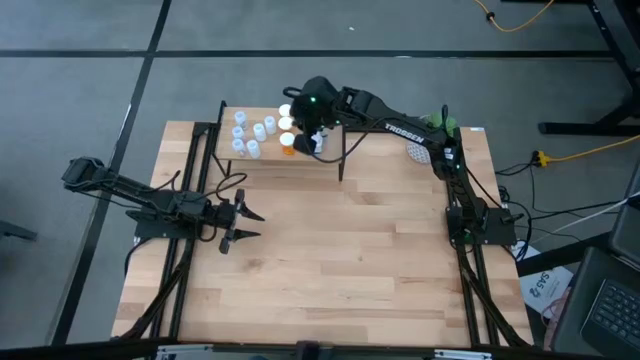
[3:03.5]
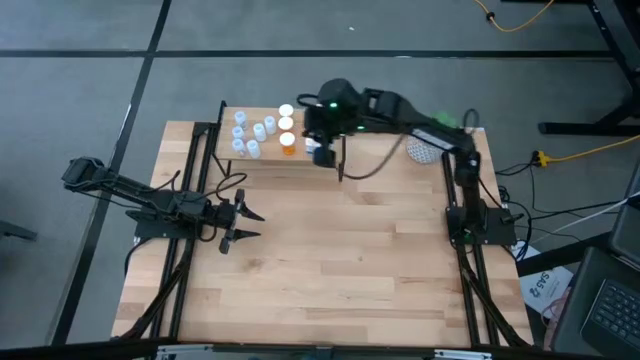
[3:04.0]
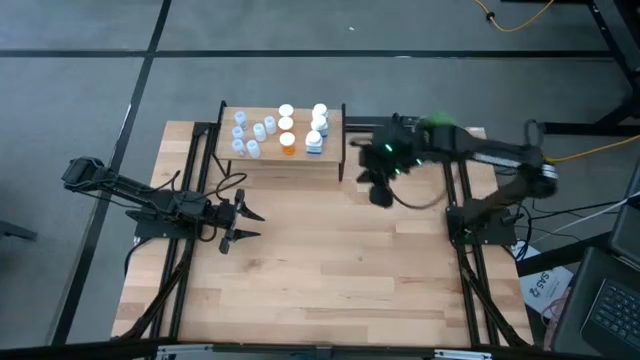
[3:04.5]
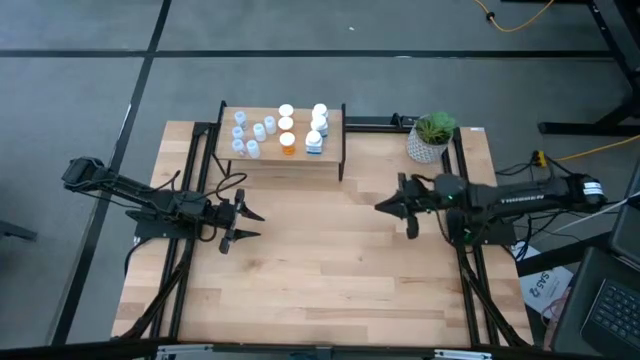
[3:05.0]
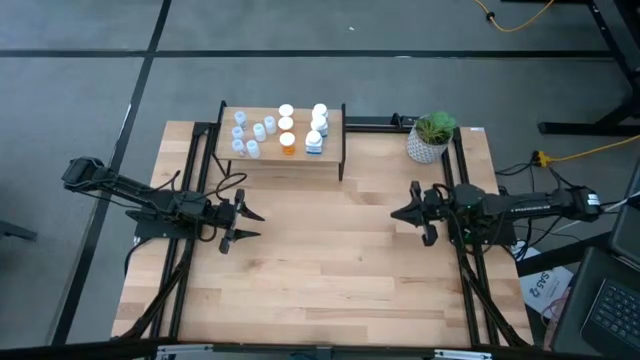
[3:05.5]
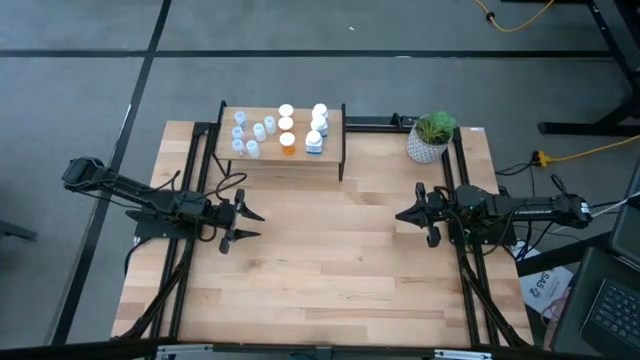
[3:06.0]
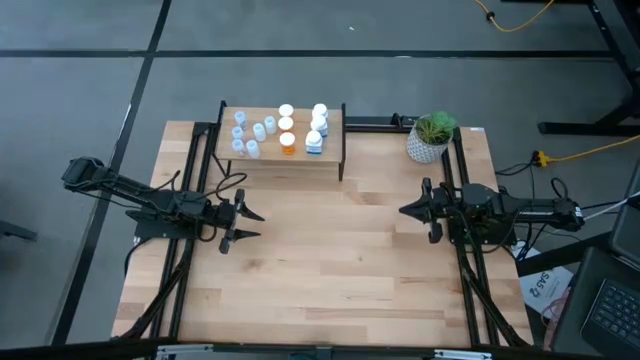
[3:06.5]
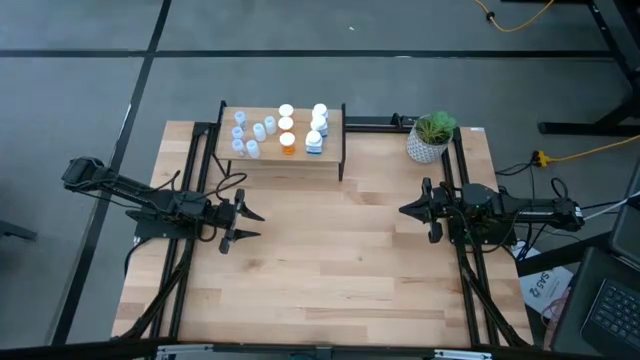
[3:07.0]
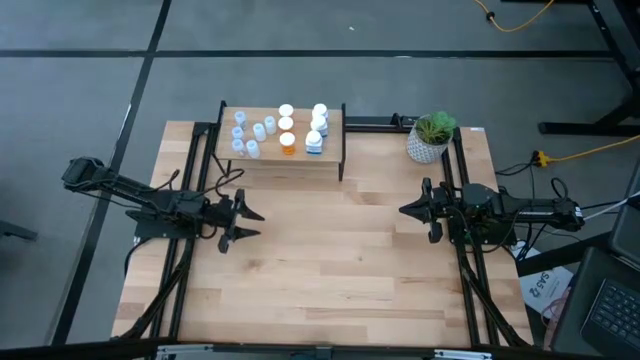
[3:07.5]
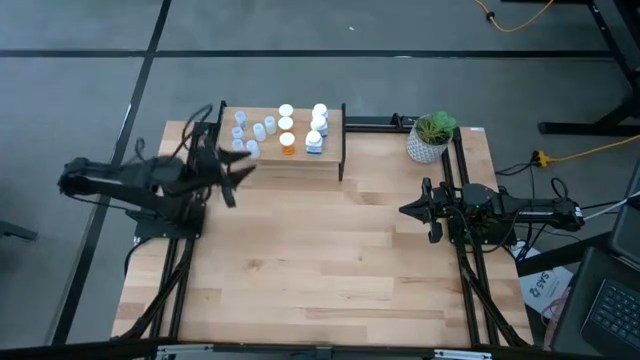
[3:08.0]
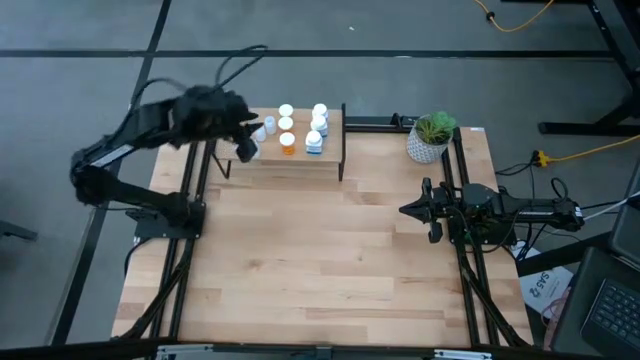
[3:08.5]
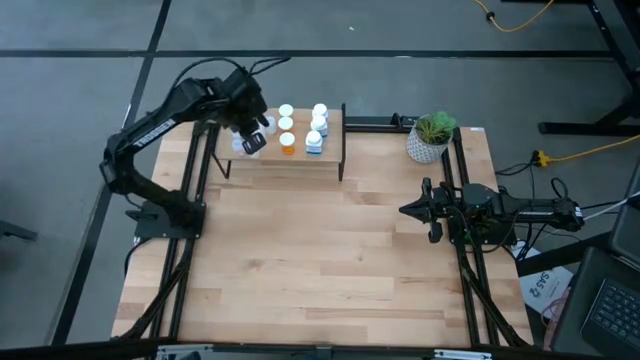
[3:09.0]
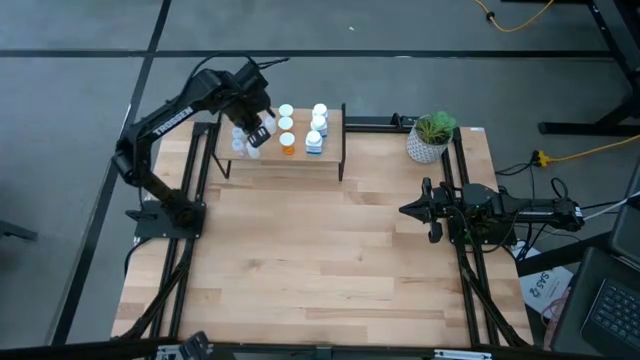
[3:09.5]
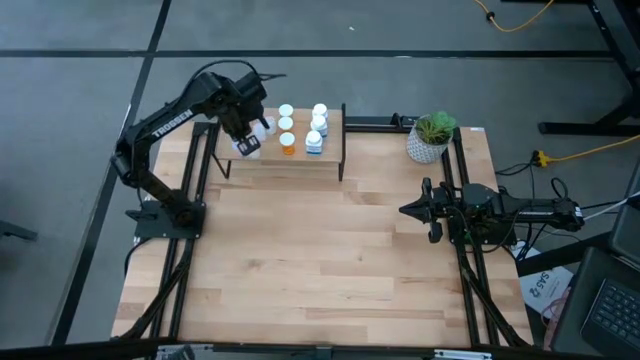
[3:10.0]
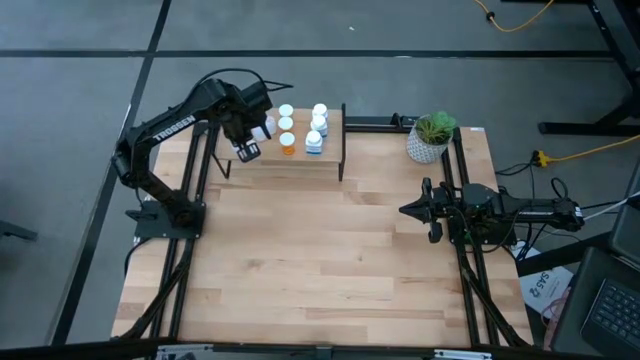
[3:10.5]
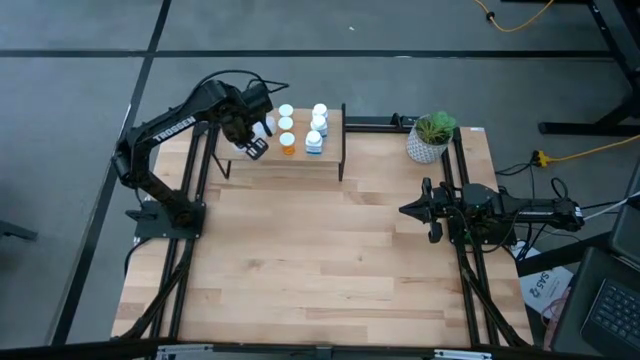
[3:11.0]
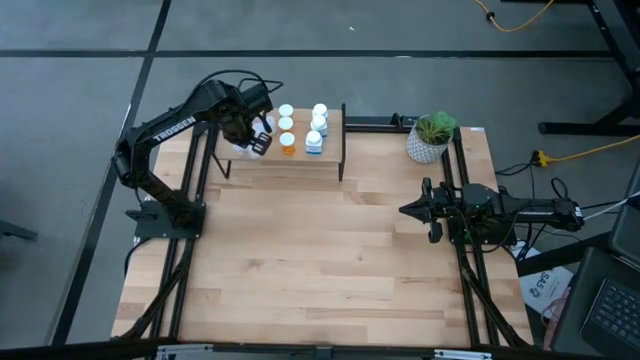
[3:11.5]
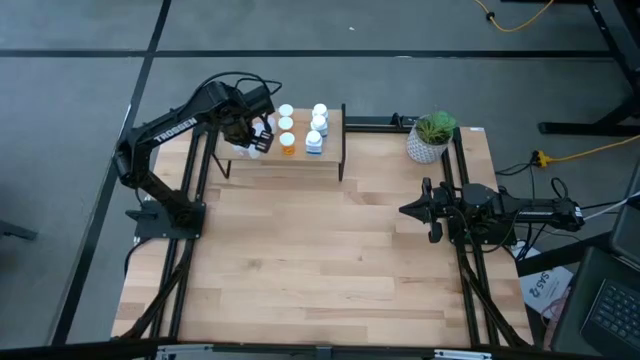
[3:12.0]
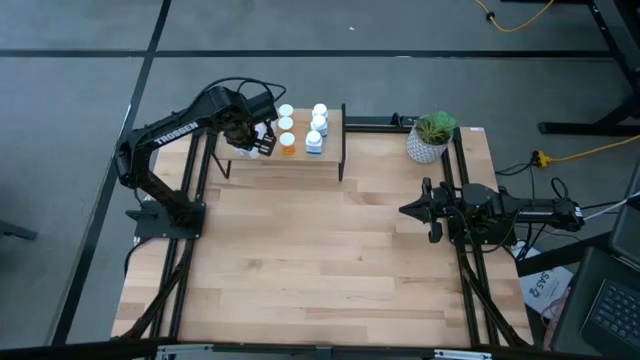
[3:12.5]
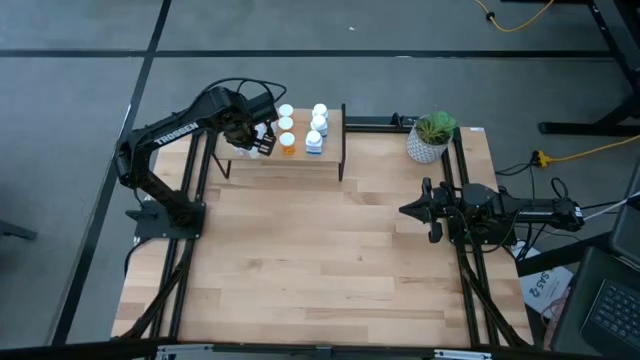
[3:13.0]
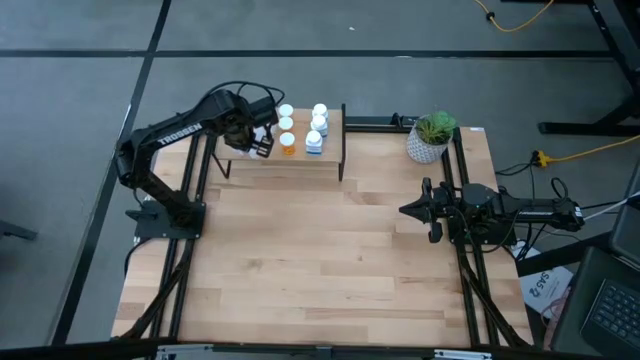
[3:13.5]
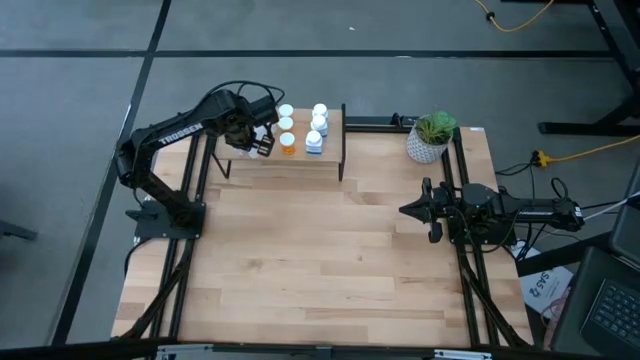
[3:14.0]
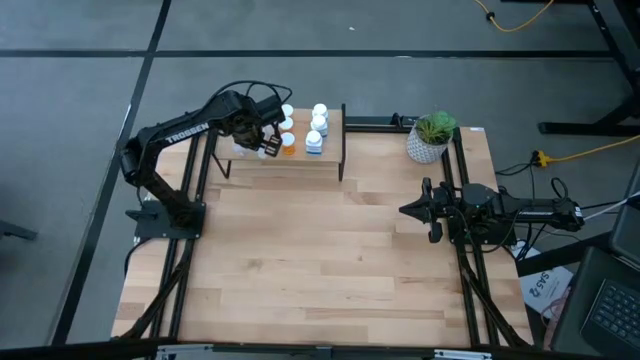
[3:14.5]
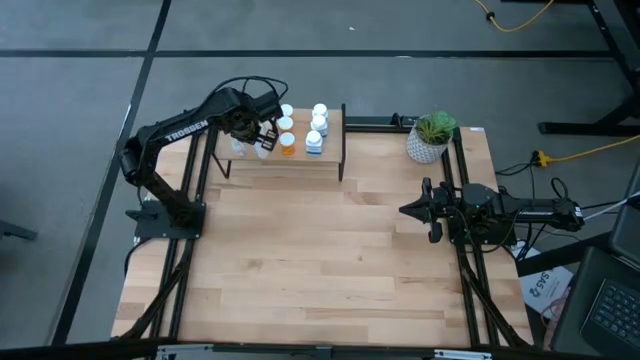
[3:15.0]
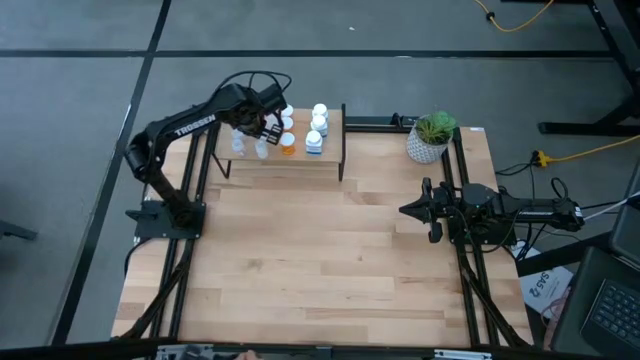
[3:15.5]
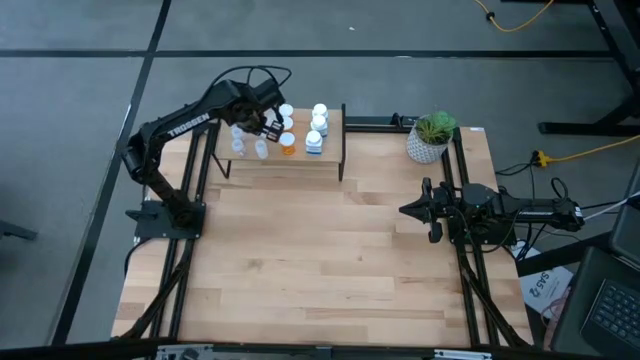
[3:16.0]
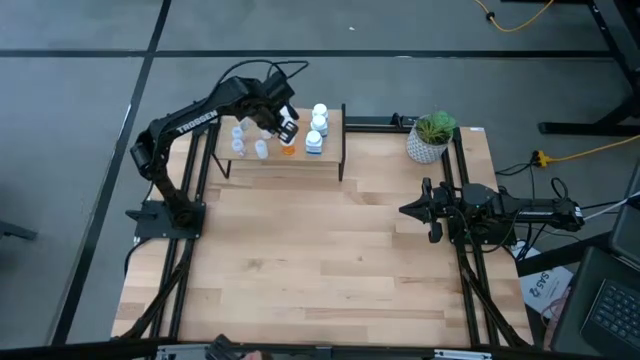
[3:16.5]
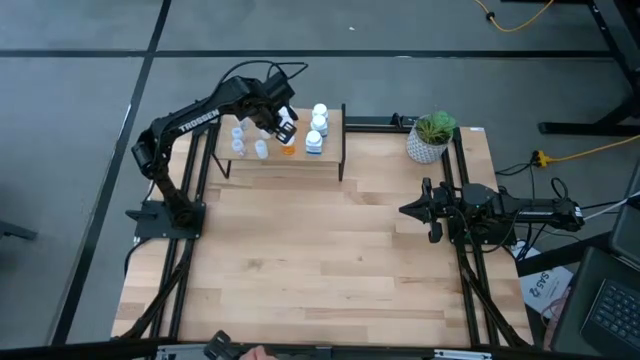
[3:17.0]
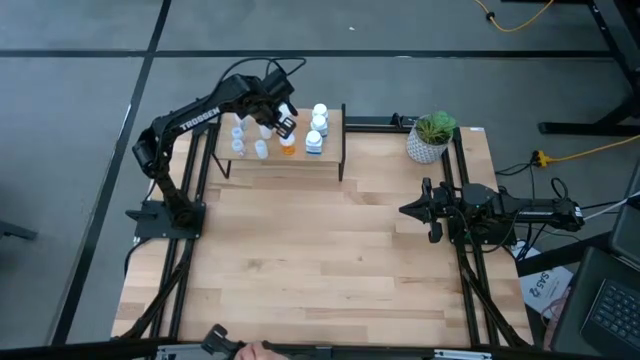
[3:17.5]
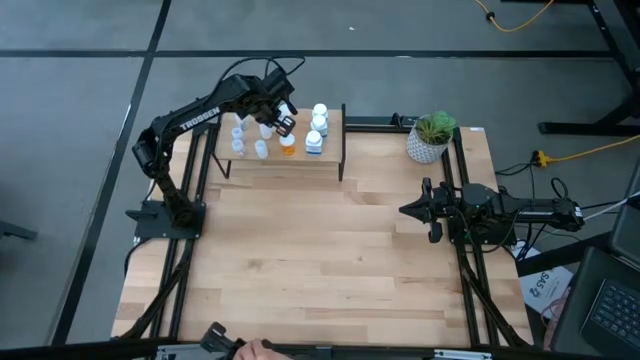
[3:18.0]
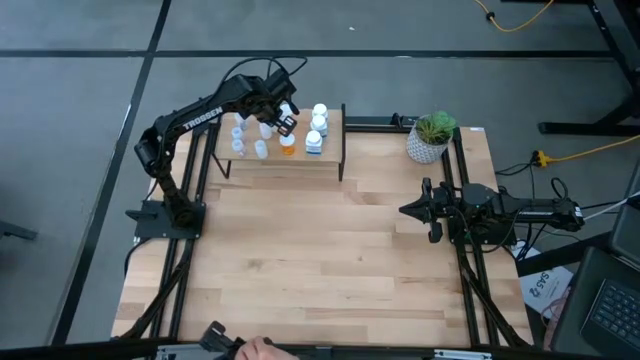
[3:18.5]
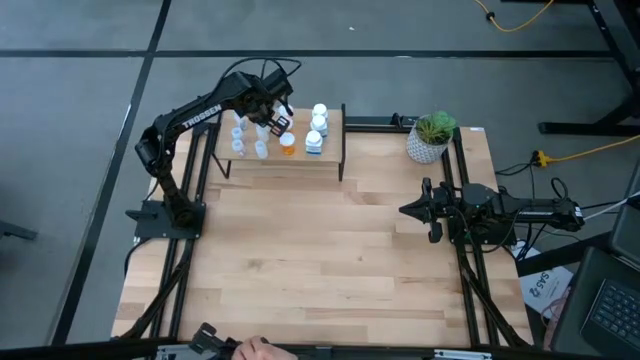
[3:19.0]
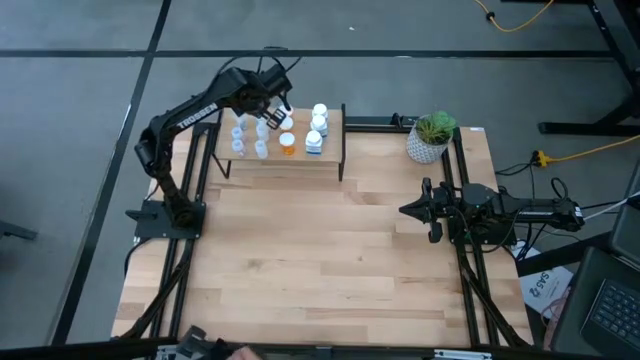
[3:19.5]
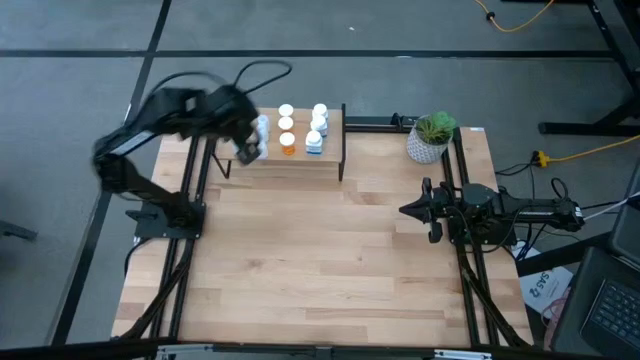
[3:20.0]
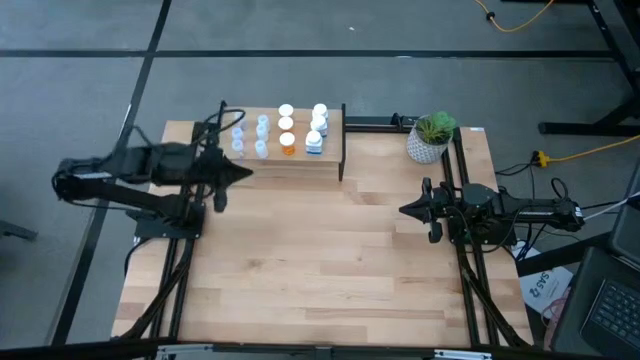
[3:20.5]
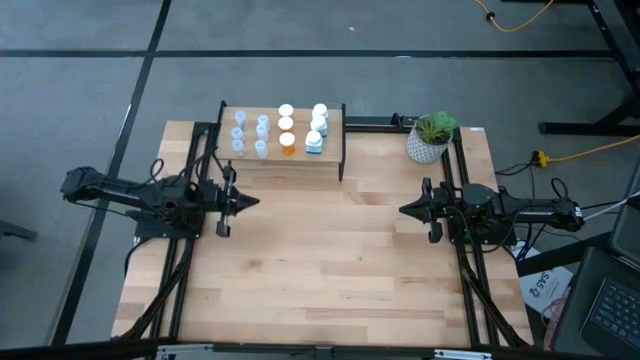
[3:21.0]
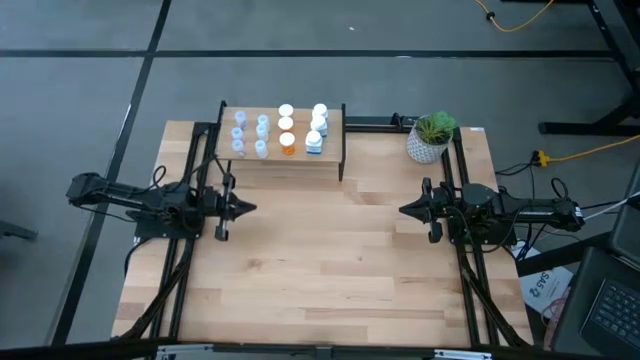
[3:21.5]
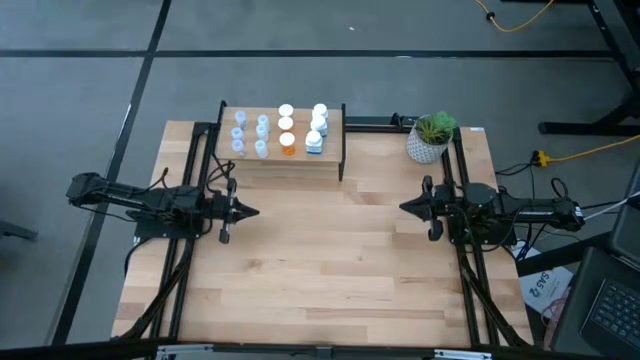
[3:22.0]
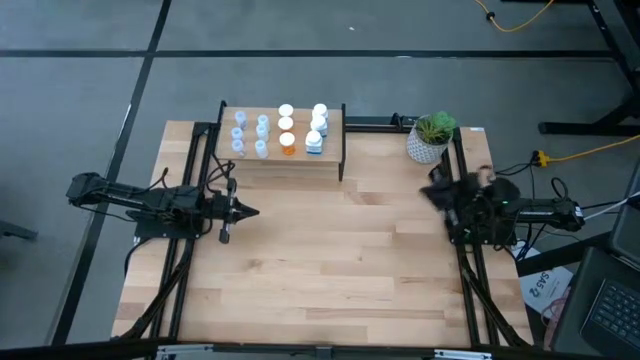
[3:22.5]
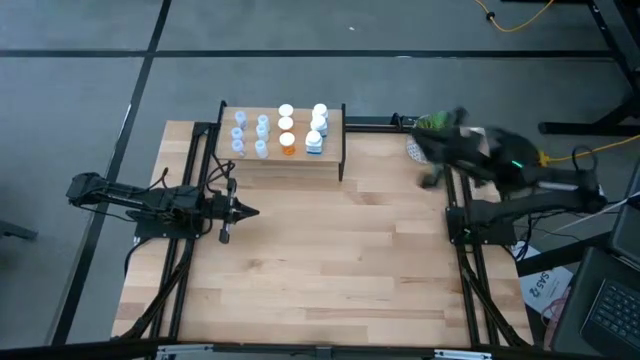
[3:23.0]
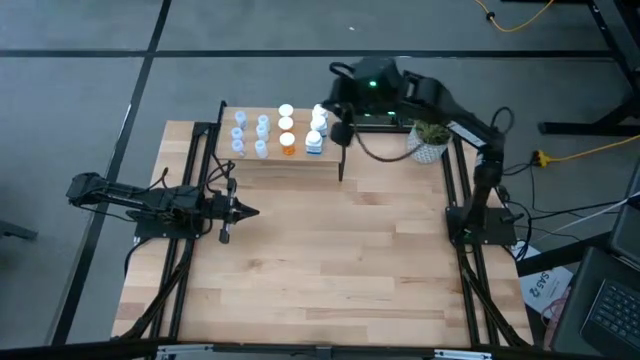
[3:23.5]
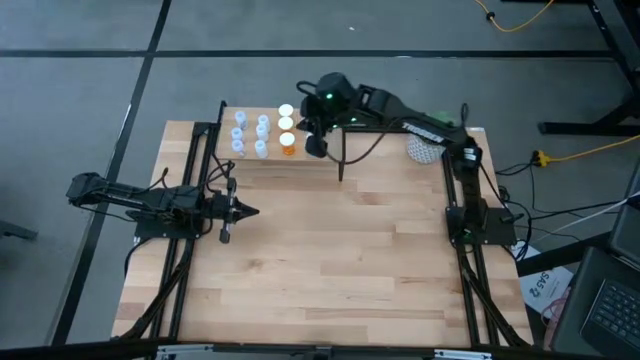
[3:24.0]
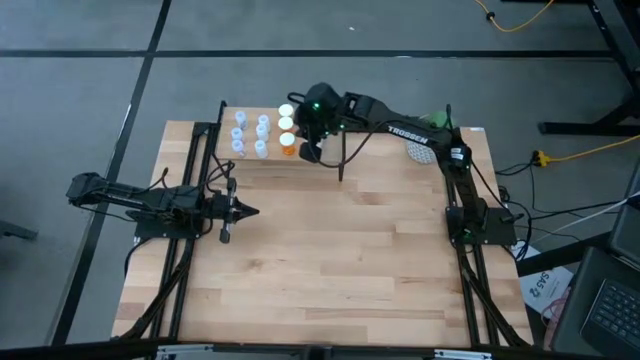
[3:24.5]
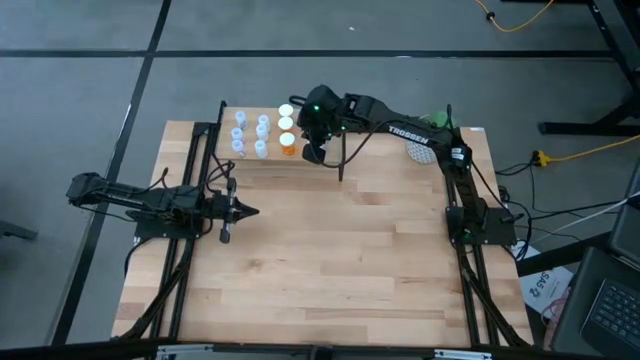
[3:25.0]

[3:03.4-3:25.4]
Task: Pick and place medicine bottles onto shelf by color
Adjust the pill bottles
